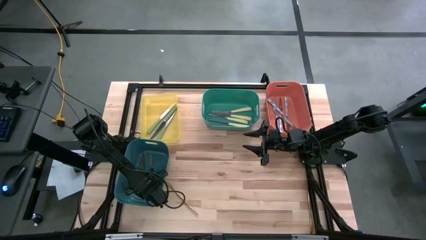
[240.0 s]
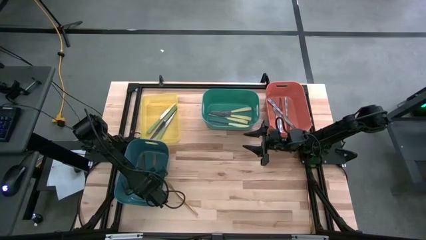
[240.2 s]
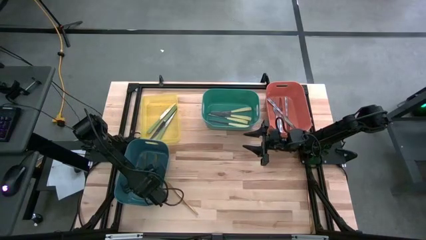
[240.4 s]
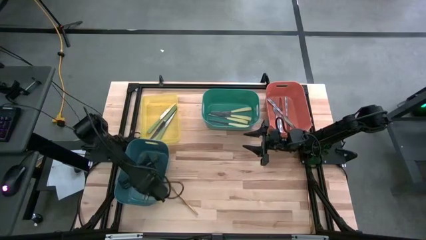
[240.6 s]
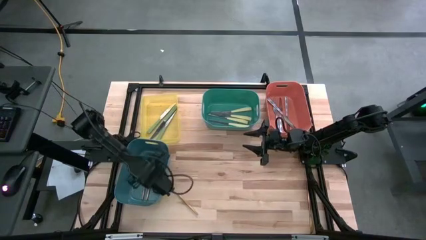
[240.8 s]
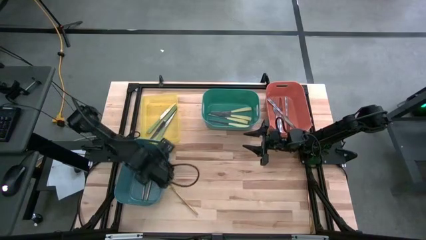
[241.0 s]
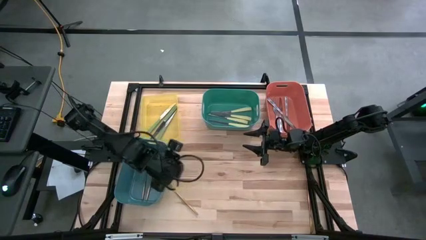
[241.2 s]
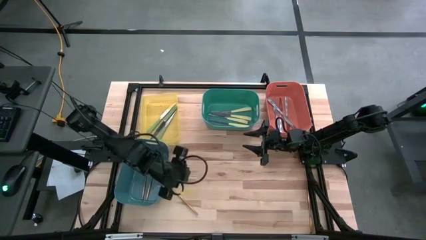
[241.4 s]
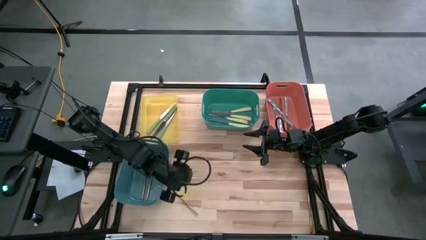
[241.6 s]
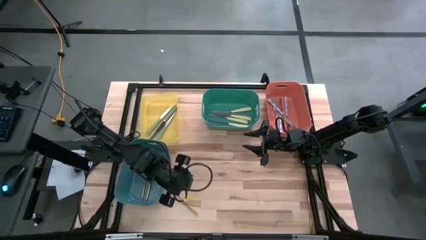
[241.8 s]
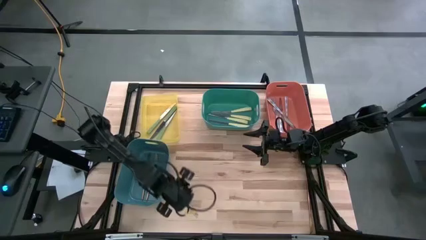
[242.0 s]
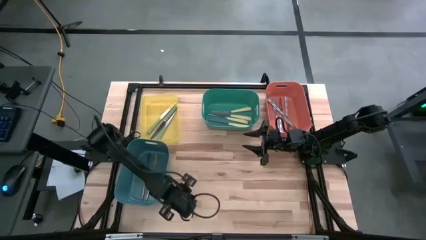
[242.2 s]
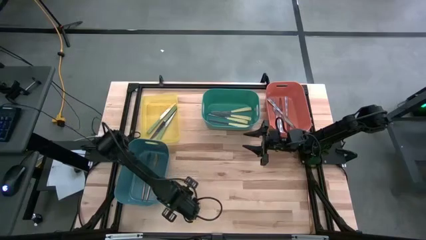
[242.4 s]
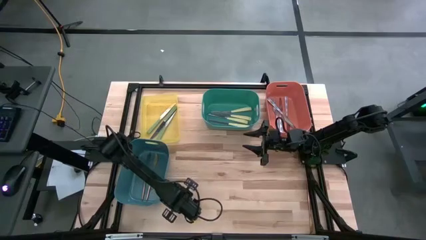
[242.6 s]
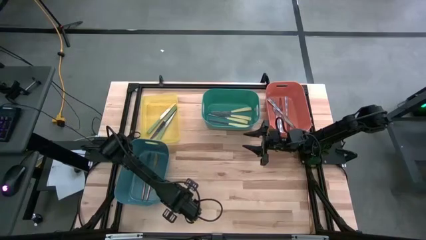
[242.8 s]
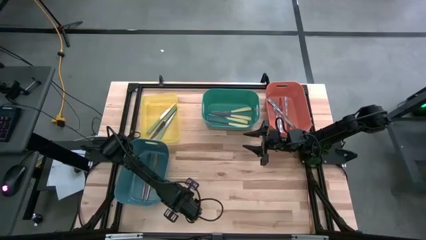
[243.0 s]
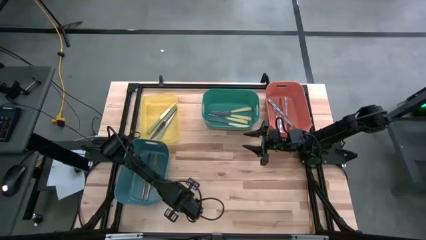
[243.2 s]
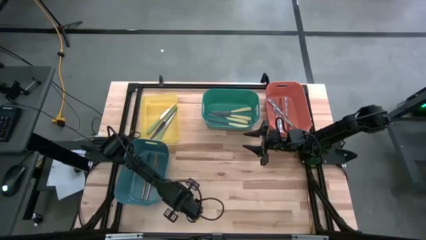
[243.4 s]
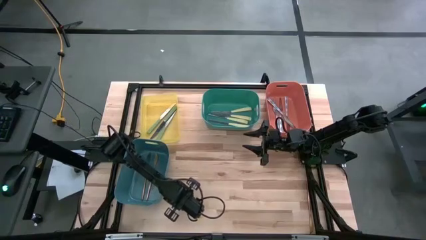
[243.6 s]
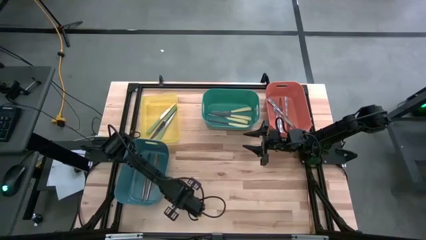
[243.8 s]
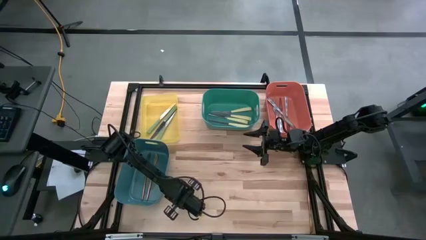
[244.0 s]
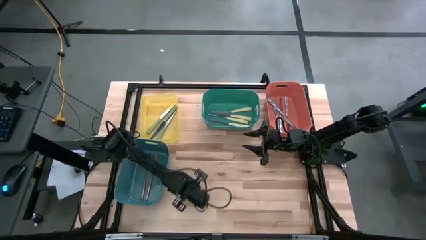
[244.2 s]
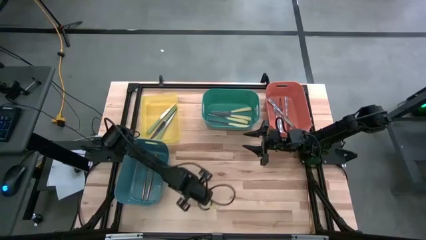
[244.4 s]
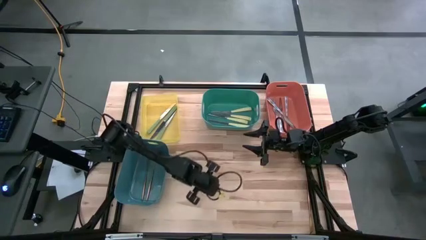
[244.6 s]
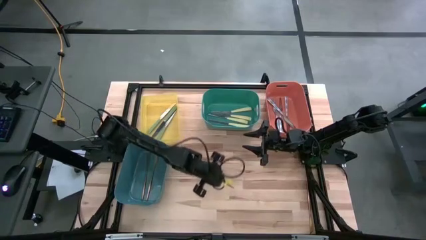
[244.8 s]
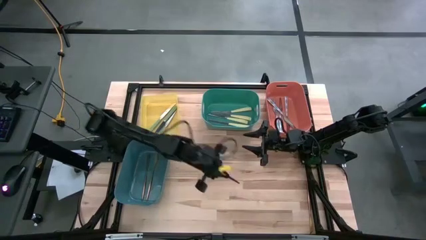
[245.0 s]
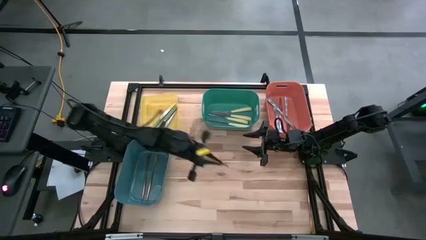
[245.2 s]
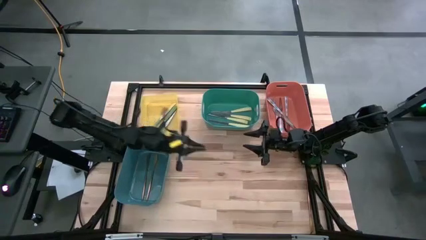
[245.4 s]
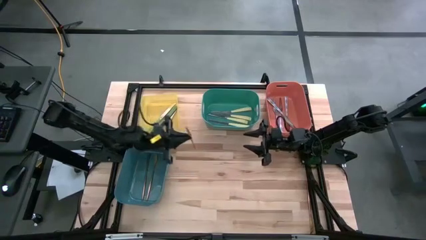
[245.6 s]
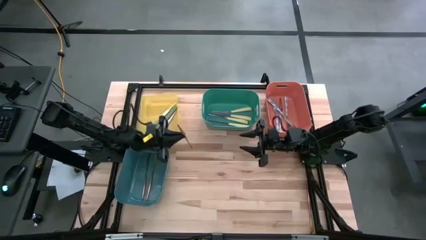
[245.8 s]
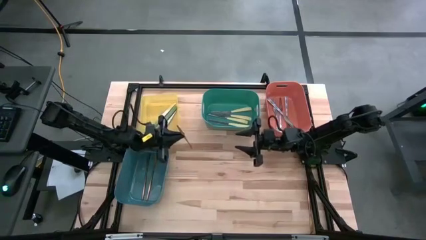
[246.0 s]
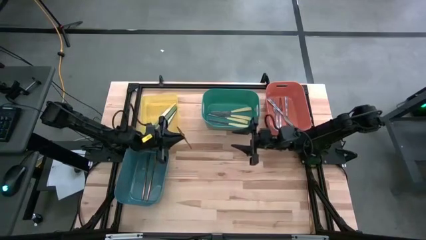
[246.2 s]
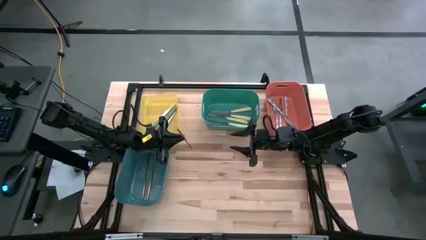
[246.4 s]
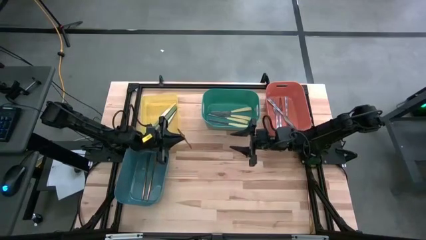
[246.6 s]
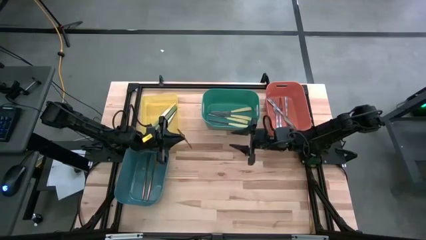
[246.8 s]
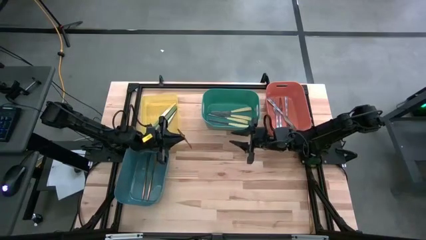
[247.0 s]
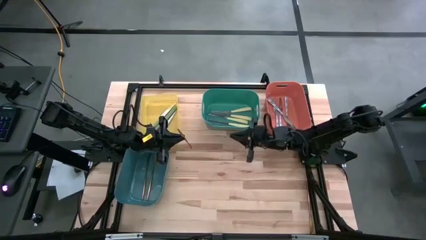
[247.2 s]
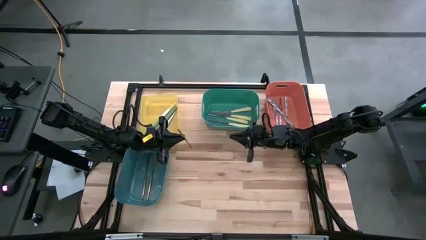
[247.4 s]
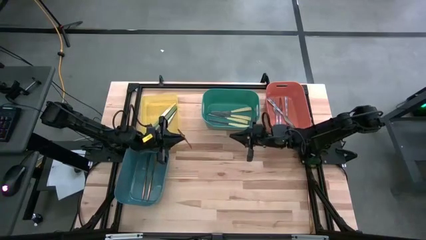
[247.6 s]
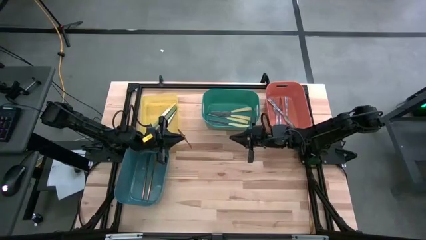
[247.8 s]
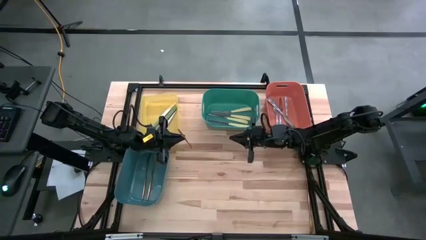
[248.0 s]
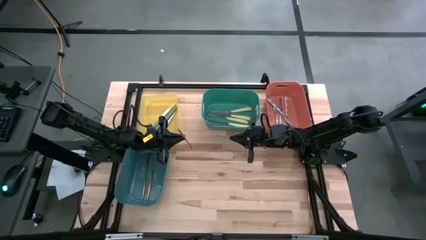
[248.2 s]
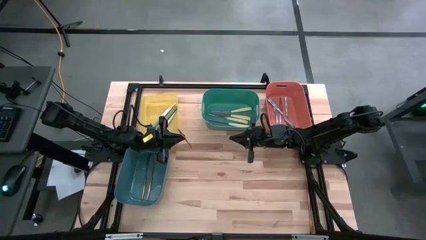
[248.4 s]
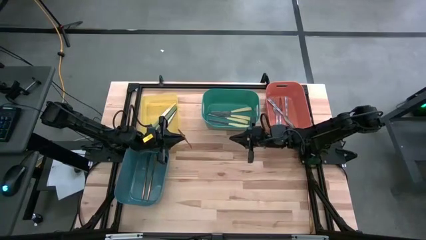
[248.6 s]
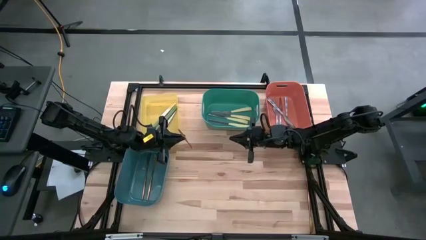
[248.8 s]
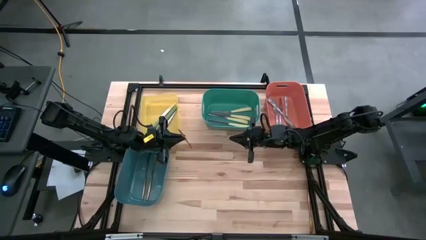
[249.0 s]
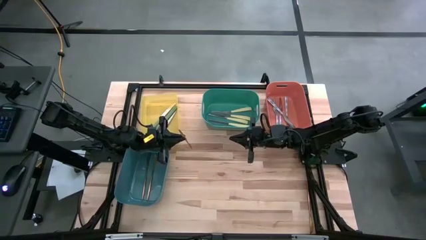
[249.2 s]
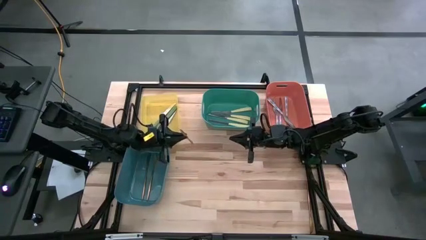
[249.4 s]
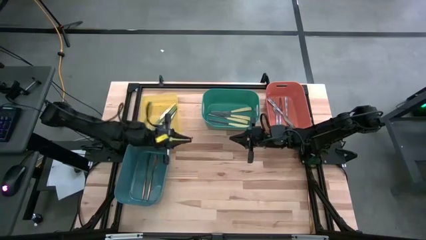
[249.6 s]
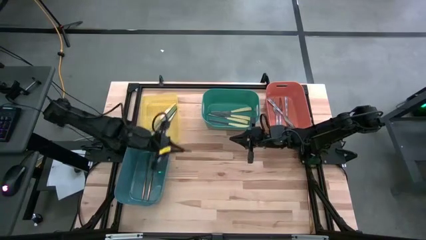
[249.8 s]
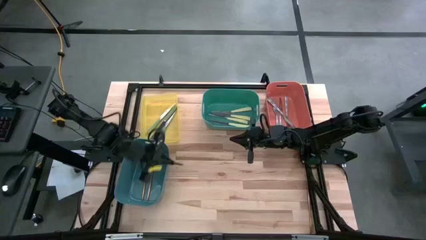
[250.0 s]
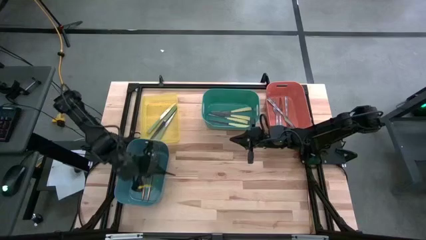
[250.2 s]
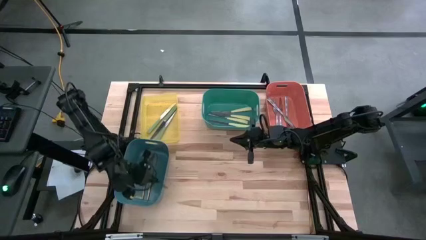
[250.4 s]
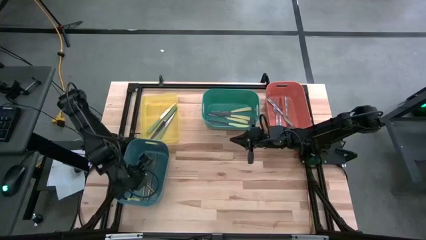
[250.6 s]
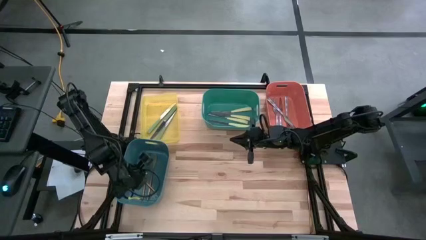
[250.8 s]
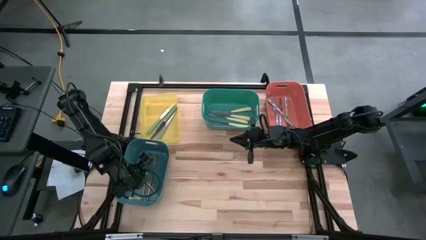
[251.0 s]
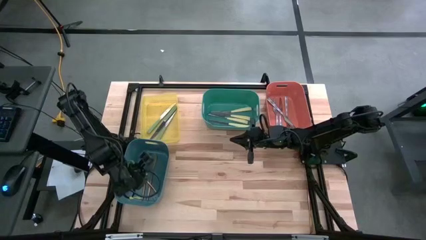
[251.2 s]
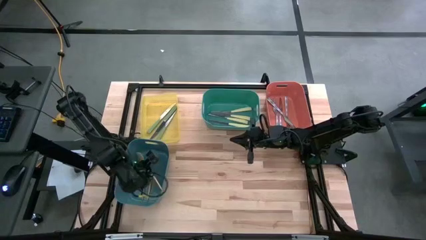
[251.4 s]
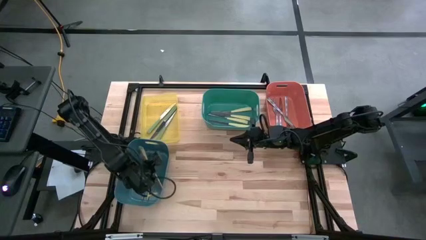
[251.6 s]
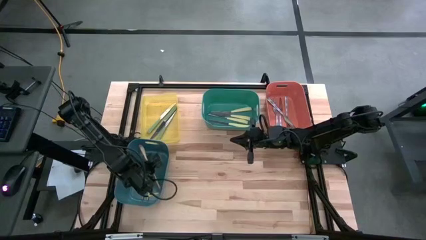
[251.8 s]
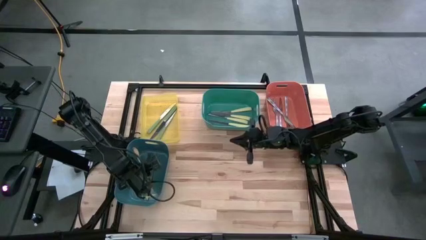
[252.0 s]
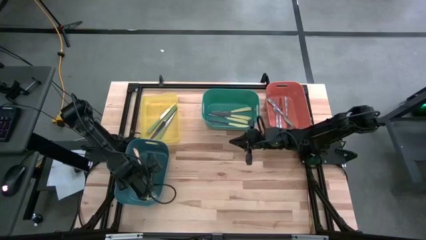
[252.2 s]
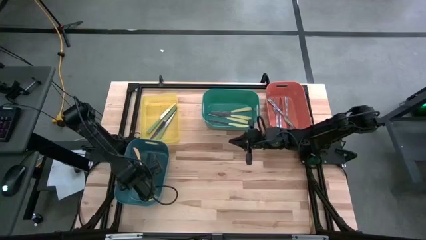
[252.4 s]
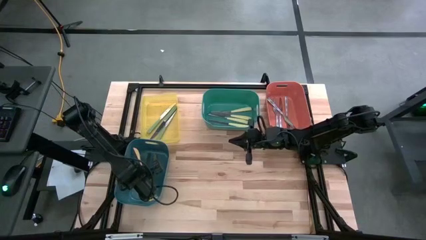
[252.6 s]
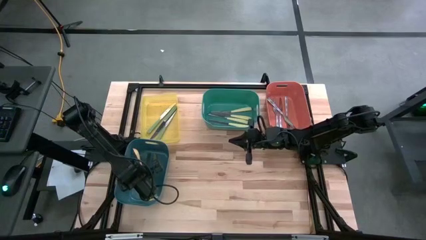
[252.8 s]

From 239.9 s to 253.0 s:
Task: Sort silverware by color (type)
Put the gold knife into the blue bin
